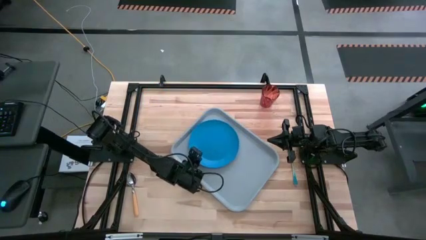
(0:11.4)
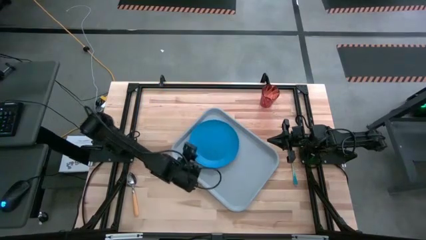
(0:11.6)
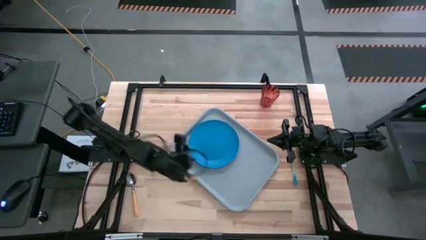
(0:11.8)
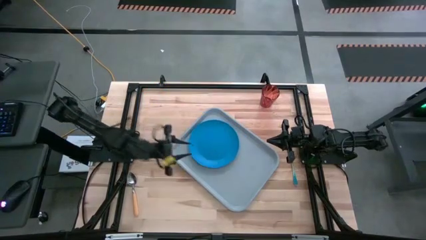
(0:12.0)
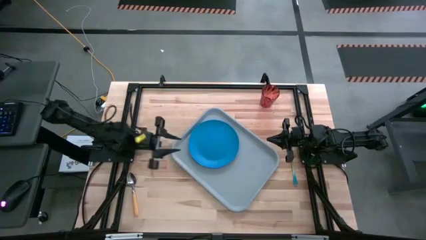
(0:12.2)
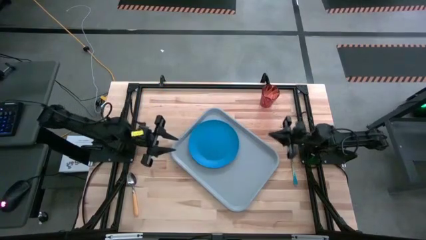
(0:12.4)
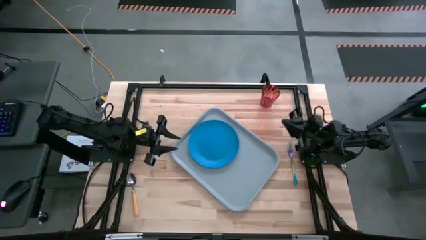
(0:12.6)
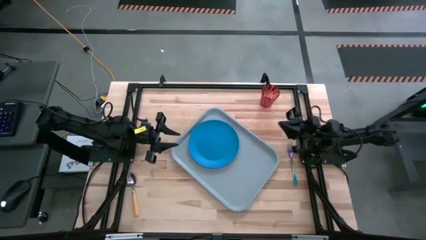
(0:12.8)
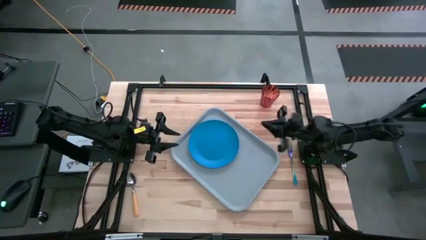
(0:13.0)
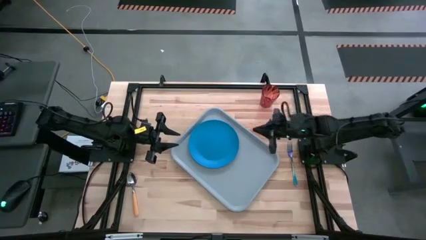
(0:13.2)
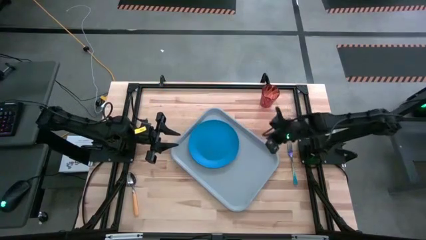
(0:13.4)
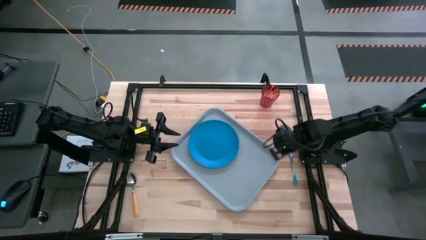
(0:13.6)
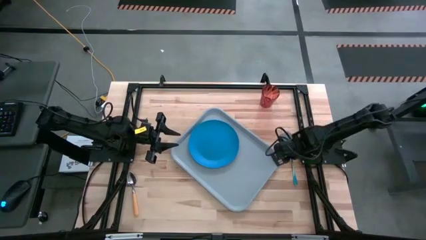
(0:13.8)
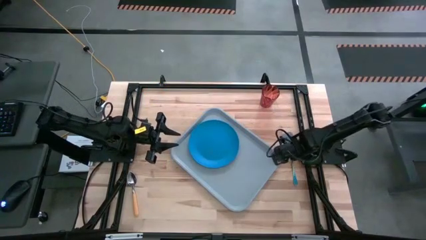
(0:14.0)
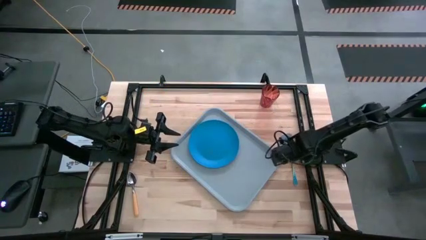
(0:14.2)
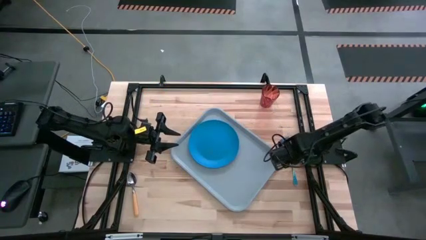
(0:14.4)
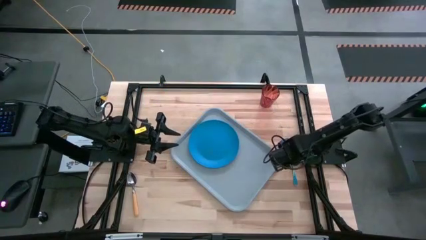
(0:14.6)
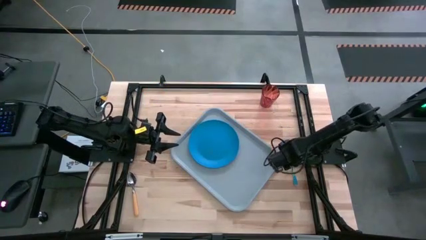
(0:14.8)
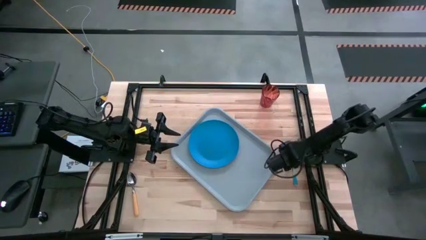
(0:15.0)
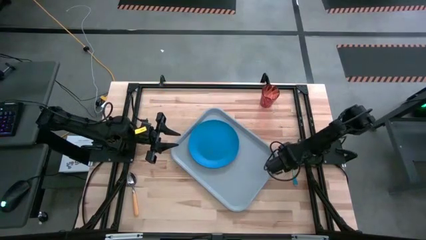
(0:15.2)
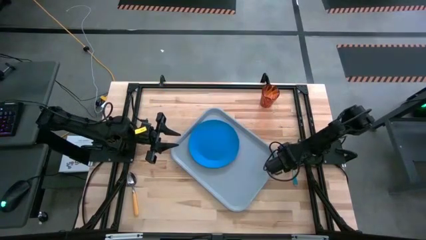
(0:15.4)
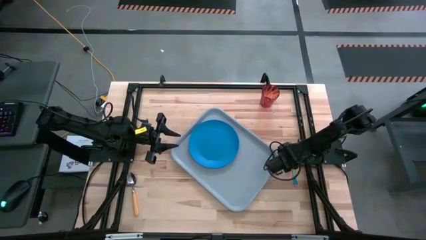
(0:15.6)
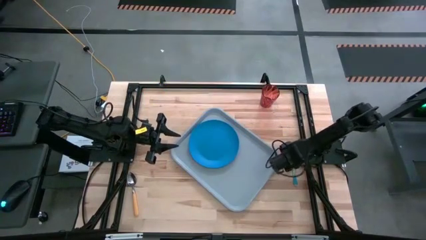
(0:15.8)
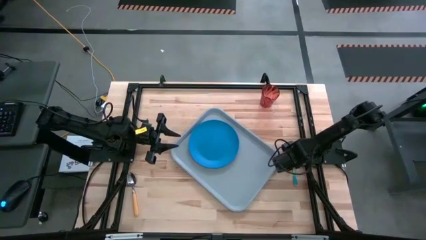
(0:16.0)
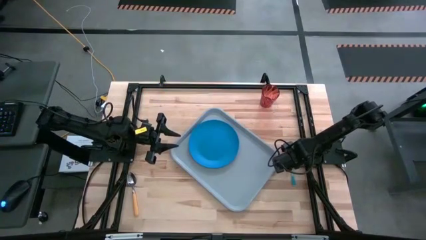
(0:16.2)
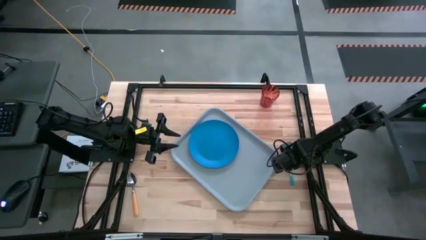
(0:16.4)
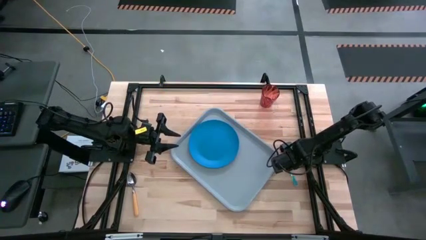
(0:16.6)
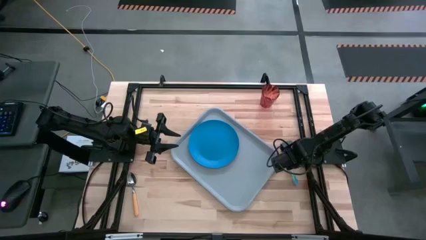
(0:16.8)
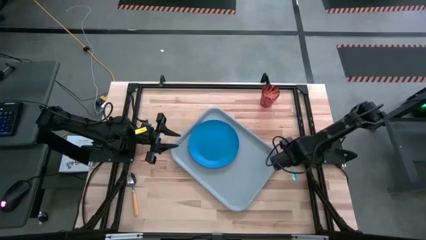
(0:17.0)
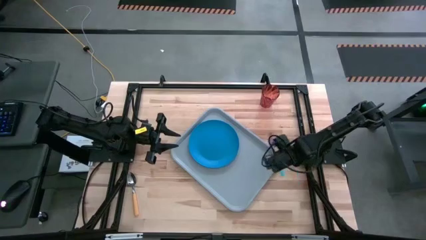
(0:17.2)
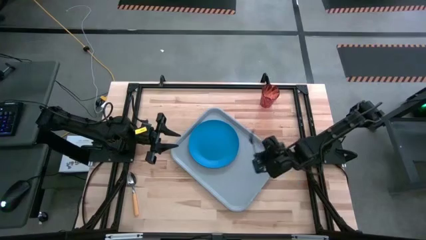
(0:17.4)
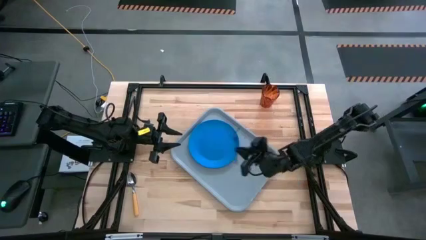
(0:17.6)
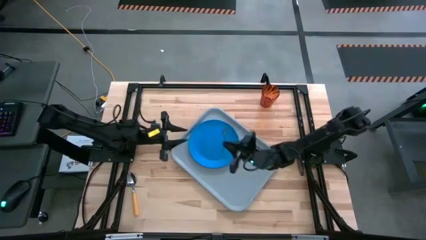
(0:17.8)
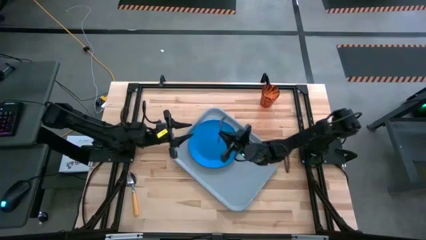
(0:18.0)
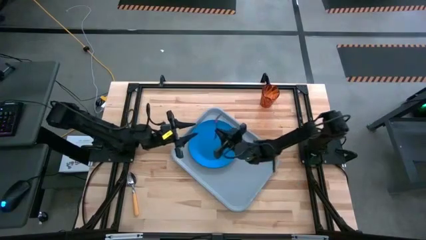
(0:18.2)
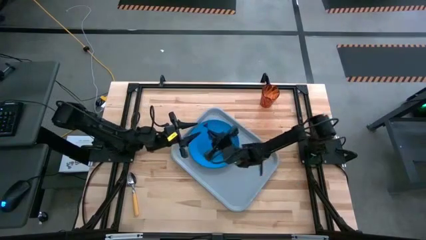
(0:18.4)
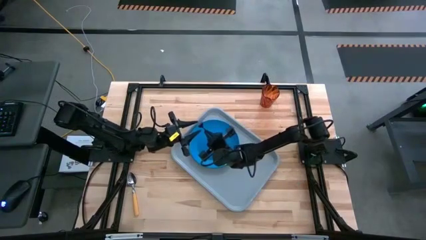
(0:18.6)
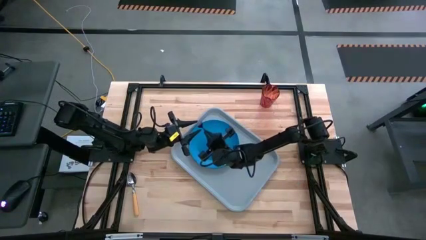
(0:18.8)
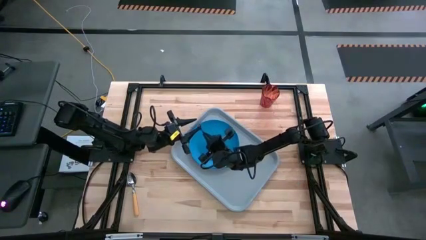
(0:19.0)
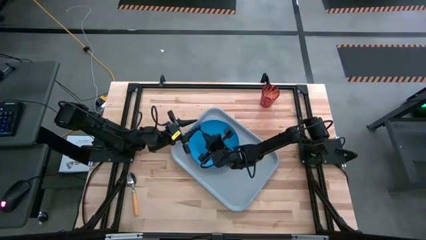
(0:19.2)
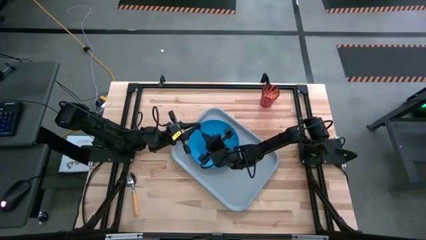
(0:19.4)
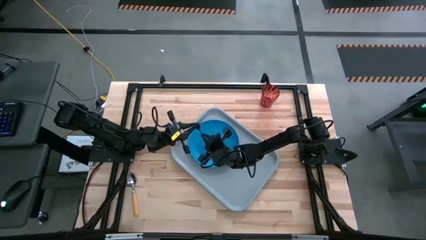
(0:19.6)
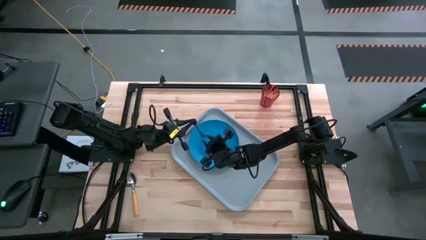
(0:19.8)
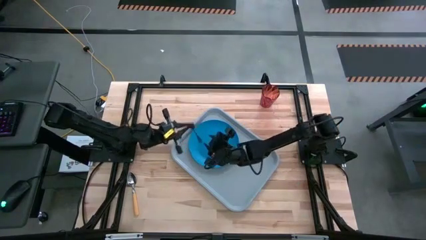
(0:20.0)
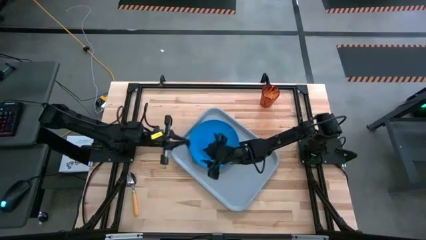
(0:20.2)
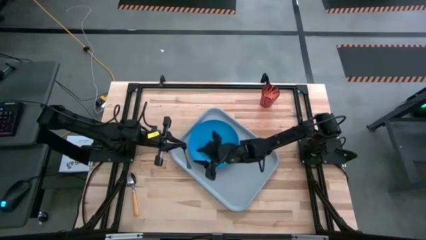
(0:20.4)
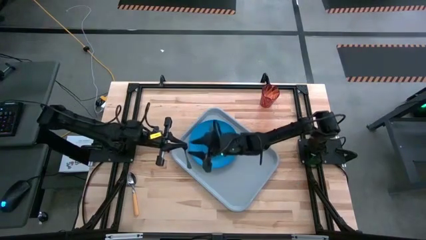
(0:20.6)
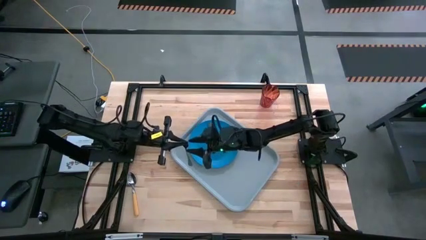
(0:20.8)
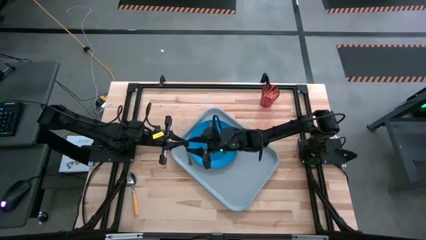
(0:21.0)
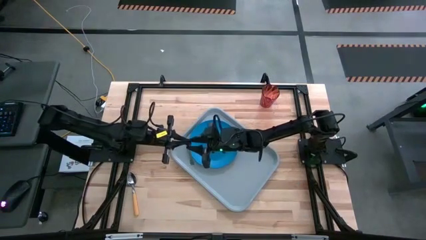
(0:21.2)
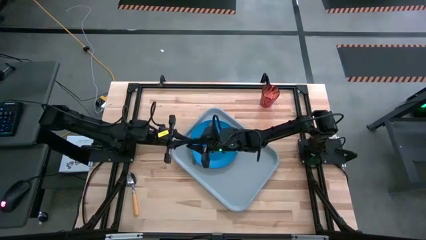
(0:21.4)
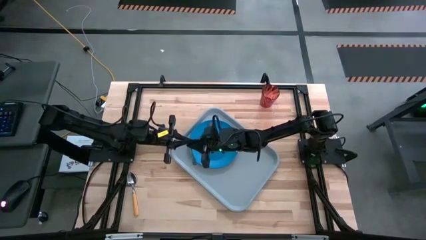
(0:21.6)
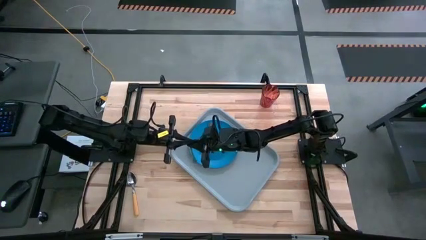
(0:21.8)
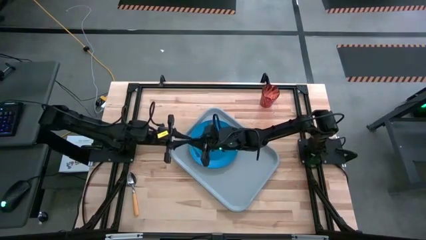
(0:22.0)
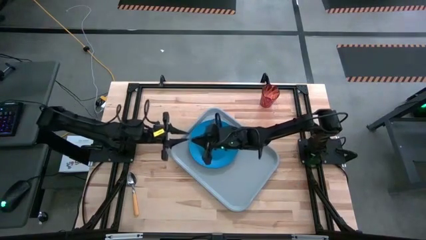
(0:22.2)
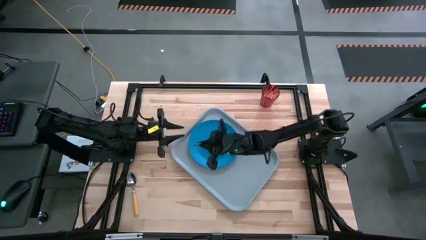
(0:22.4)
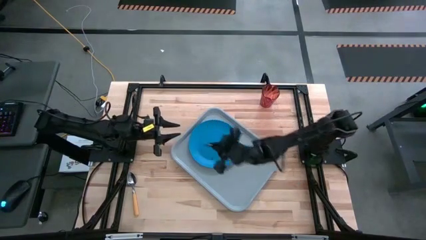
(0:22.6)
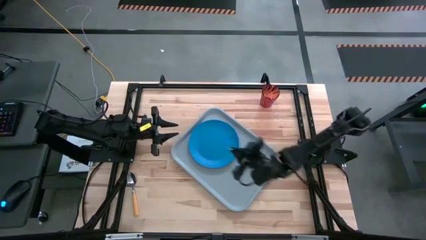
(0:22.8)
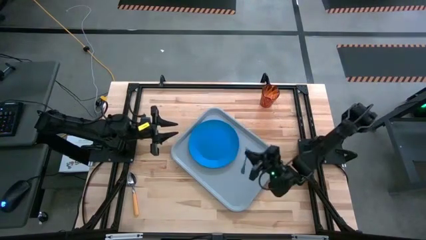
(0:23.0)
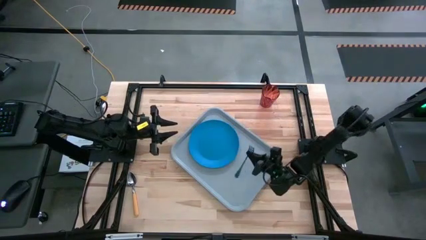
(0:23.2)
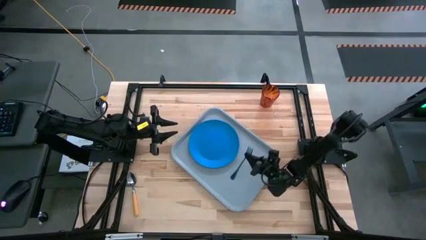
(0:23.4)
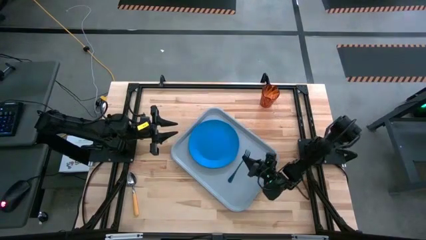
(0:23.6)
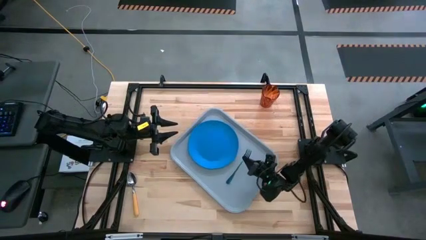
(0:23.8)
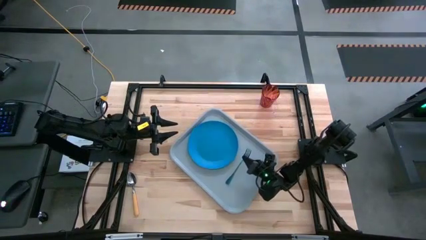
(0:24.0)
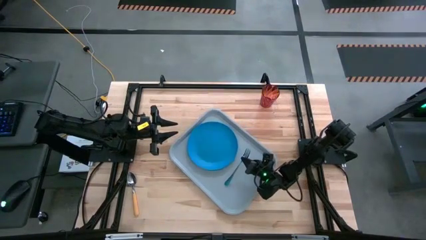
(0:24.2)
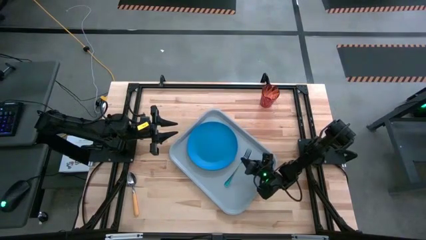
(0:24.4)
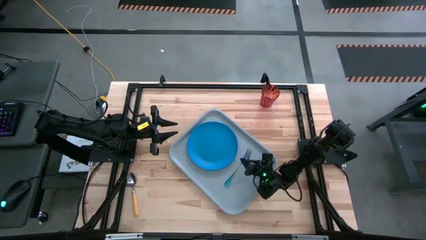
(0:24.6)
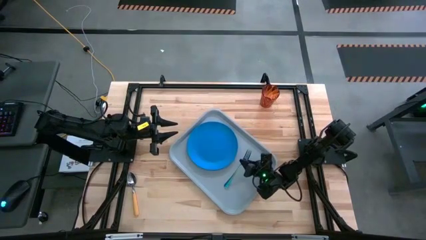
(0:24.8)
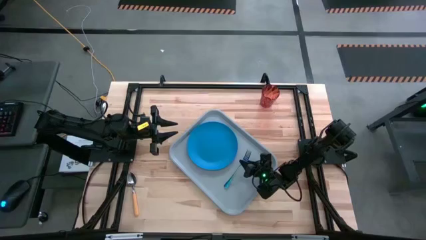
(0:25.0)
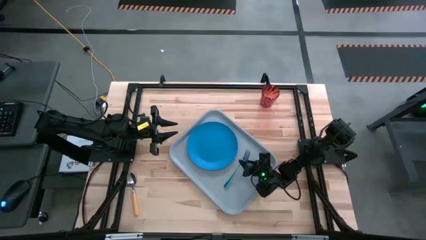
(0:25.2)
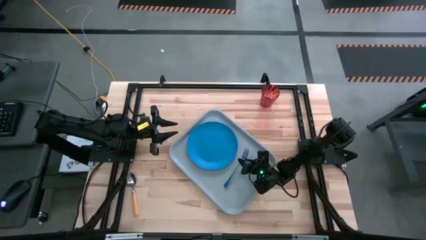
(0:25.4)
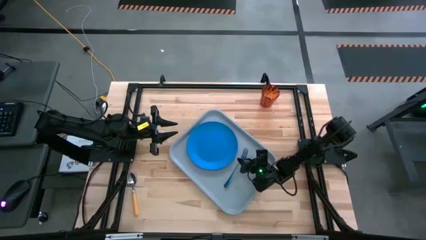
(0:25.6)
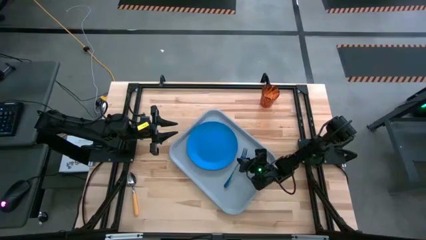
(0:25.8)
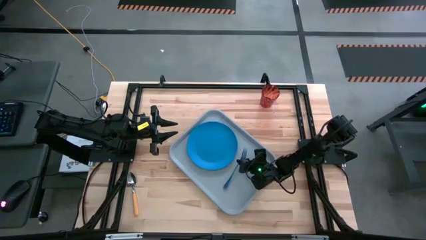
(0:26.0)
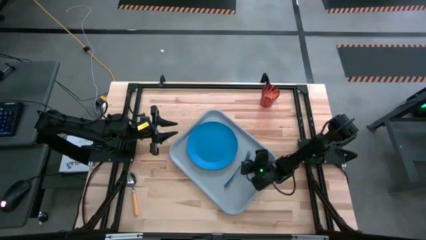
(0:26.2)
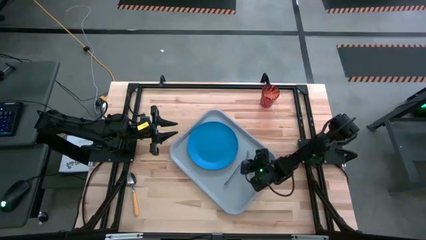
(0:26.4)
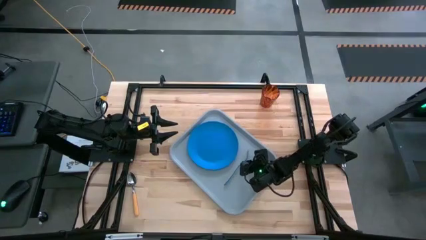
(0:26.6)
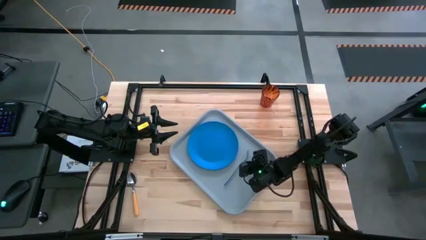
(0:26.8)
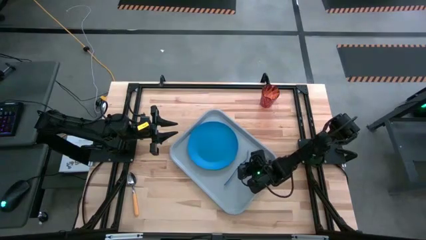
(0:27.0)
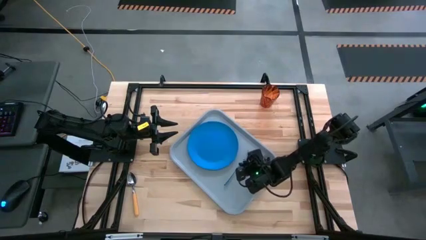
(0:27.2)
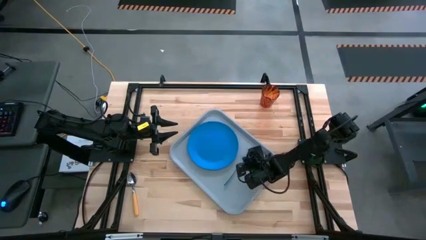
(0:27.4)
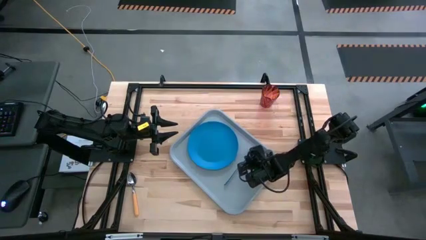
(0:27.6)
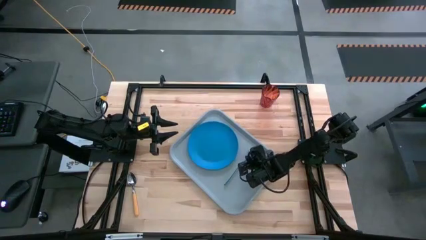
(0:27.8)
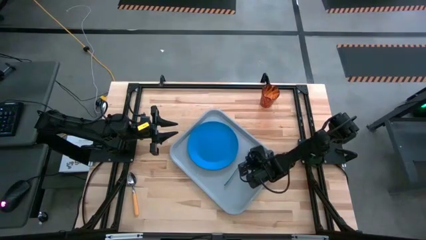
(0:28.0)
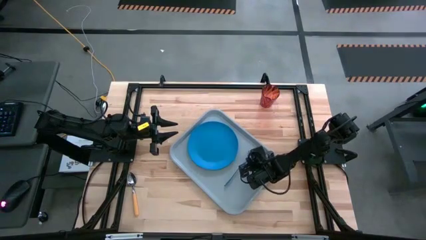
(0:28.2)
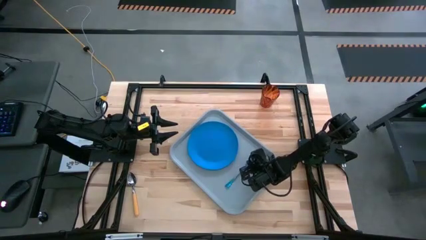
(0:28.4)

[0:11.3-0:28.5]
Task: Pick and place plate/cup/fork/spoon on tray
Put the blue fork on the right side of the gray serving tray
